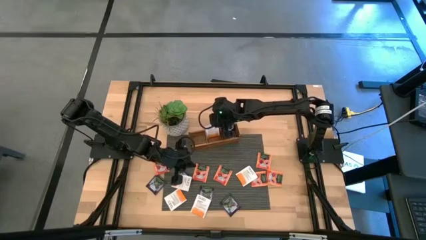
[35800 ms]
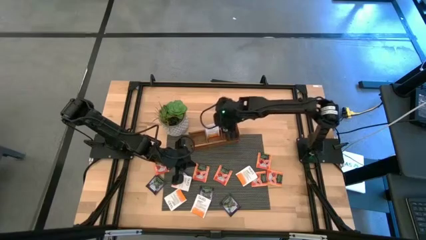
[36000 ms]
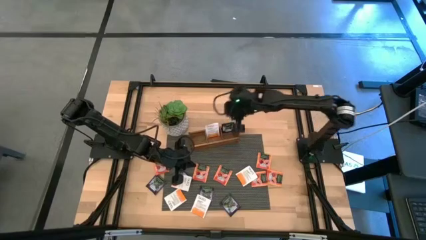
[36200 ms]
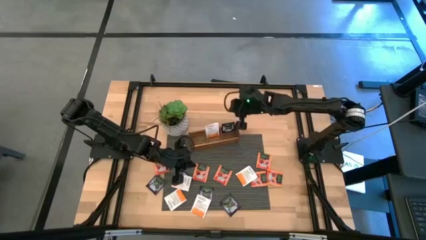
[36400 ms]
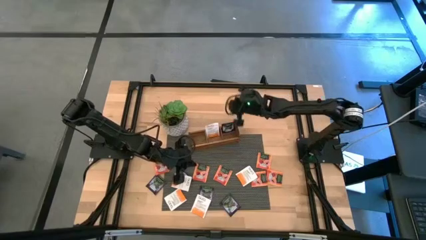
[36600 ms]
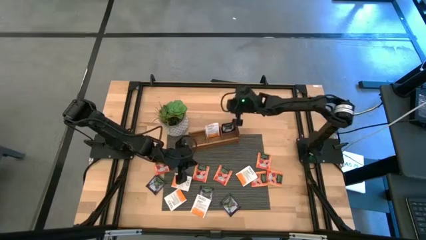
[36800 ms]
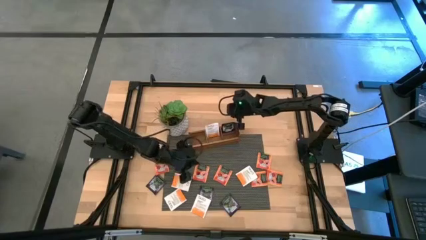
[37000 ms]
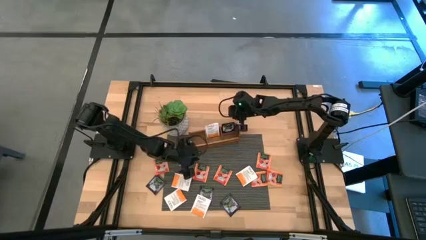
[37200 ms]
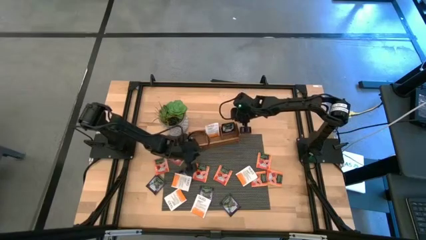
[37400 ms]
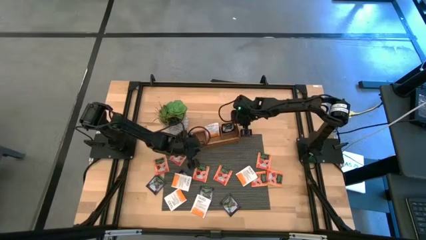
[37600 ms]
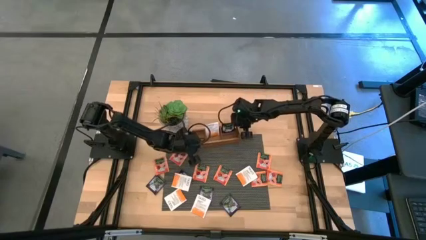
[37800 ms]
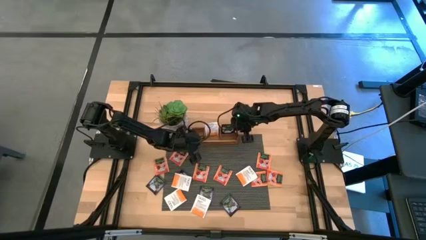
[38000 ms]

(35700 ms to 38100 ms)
Task: Pick & Place Tea
Adjust the wooden organizer on the table

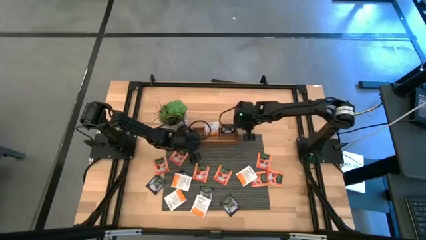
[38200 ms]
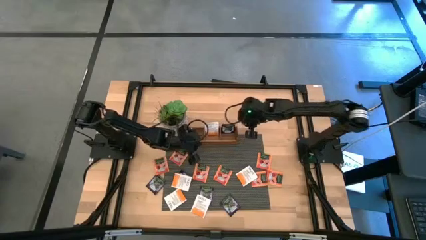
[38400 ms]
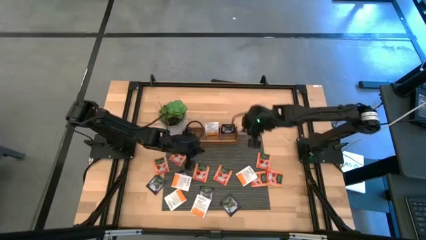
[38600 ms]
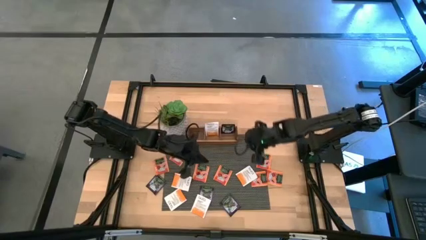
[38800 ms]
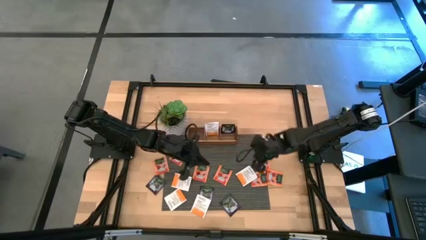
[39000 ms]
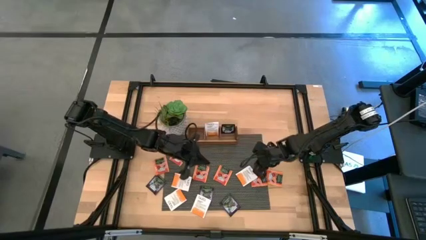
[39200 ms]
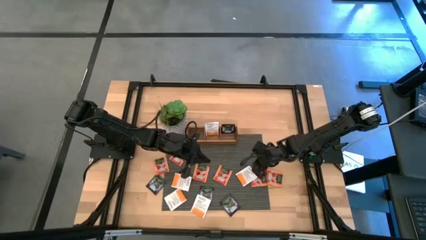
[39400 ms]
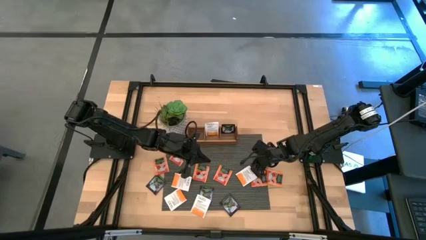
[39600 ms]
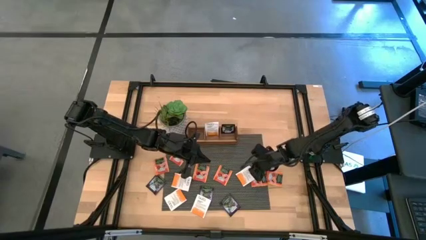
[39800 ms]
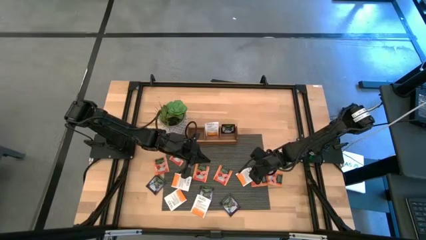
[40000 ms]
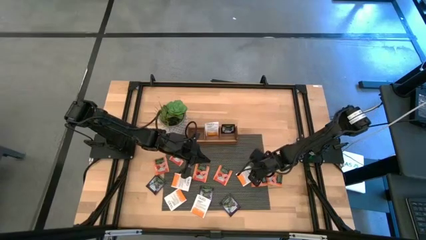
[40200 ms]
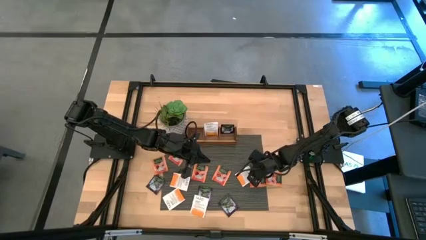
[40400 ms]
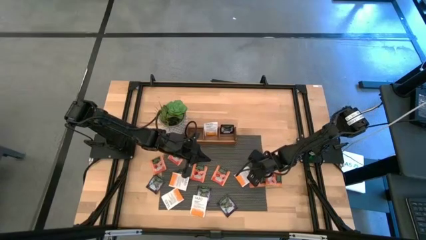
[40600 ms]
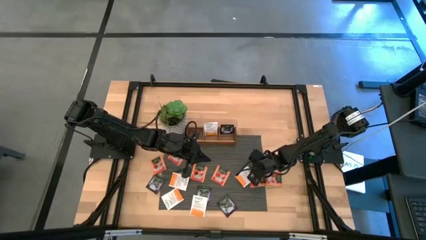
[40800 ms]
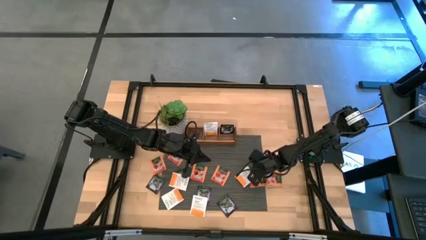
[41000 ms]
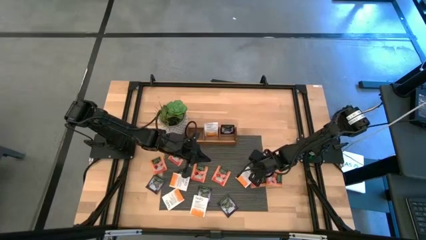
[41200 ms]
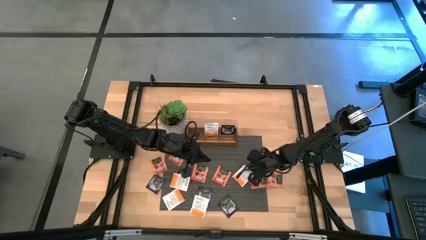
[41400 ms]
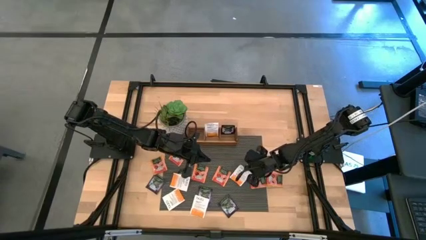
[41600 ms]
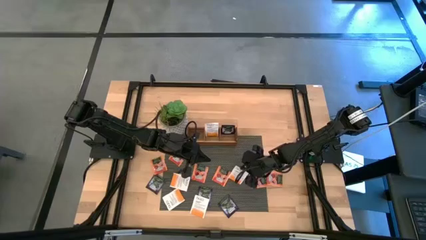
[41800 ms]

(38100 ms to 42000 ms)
Put the white tea bag into the middle slot of the wooden organizer

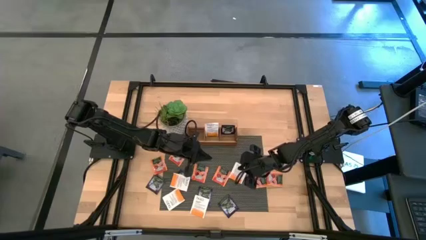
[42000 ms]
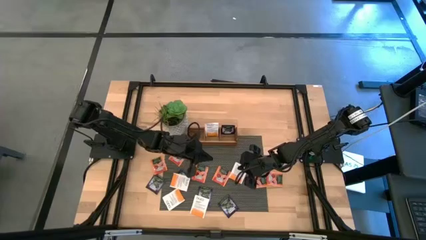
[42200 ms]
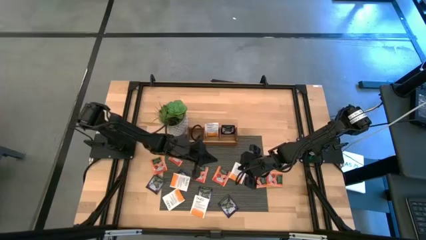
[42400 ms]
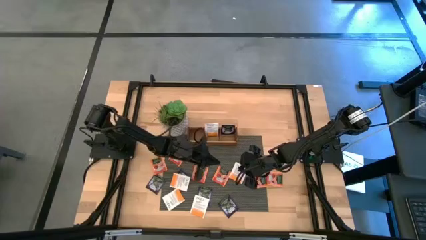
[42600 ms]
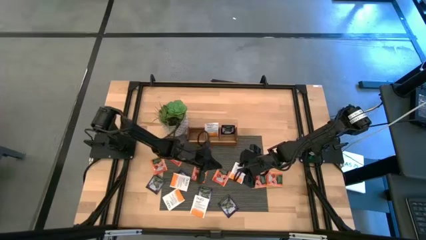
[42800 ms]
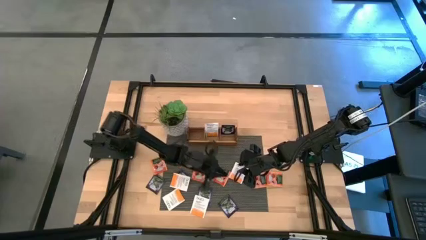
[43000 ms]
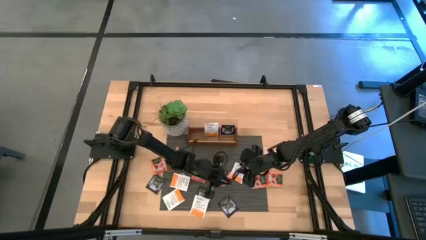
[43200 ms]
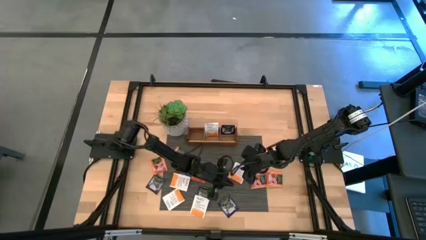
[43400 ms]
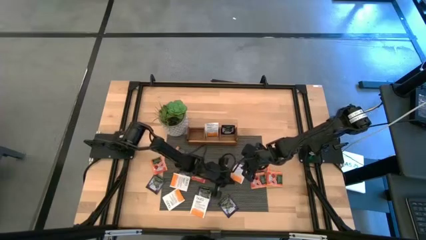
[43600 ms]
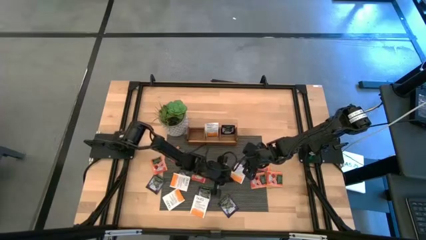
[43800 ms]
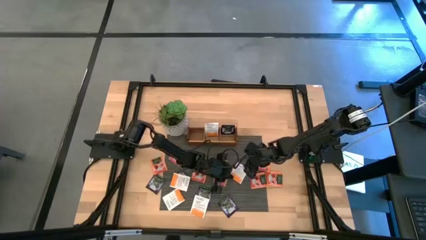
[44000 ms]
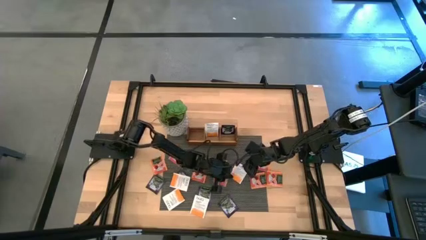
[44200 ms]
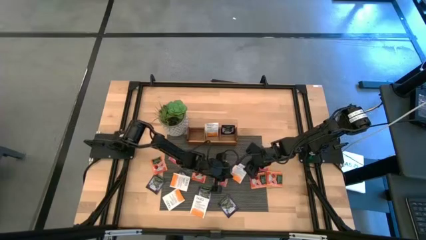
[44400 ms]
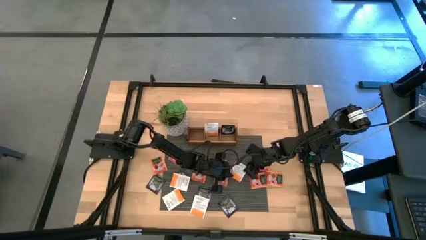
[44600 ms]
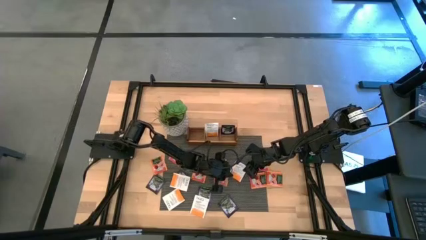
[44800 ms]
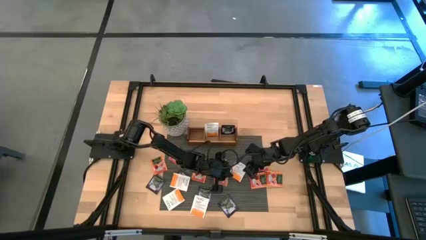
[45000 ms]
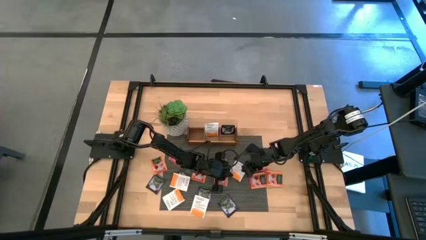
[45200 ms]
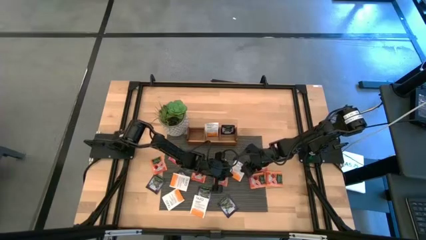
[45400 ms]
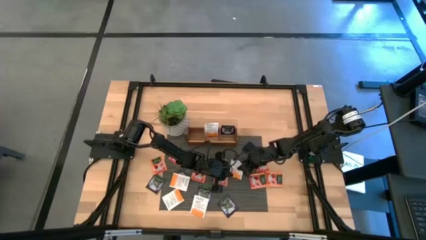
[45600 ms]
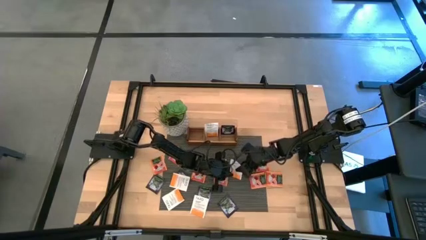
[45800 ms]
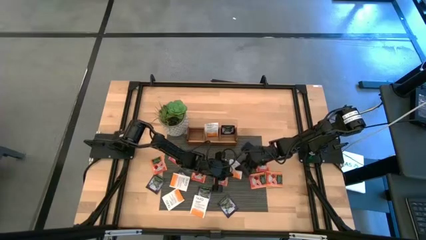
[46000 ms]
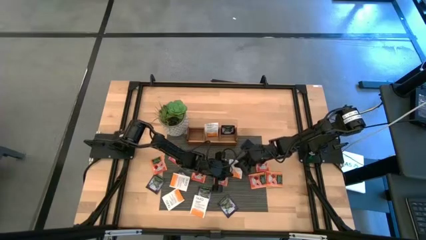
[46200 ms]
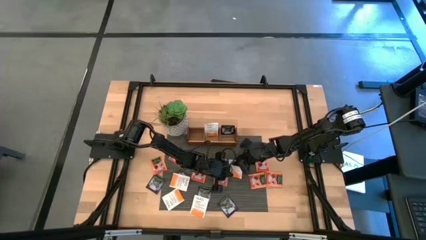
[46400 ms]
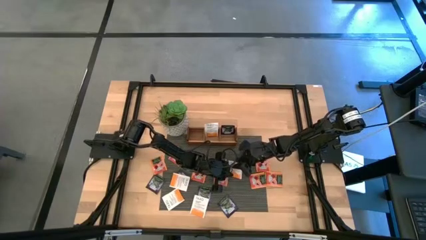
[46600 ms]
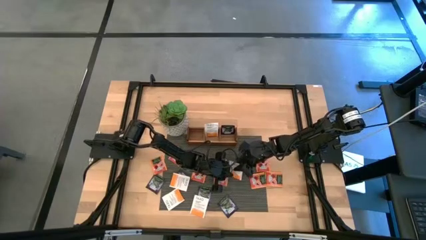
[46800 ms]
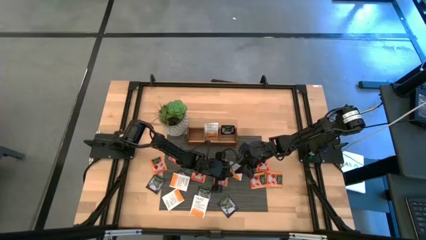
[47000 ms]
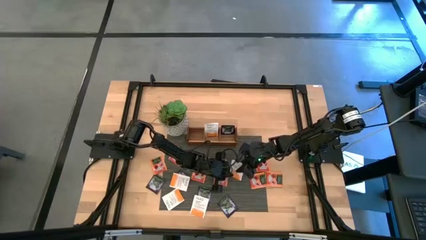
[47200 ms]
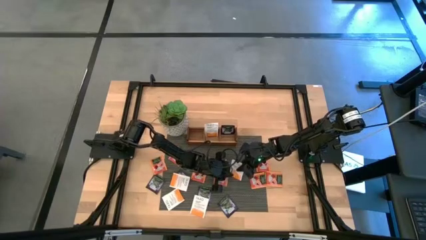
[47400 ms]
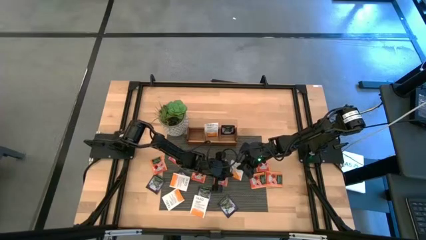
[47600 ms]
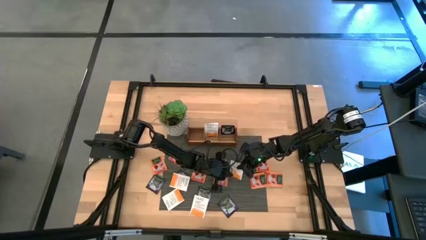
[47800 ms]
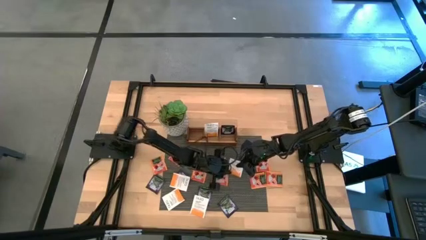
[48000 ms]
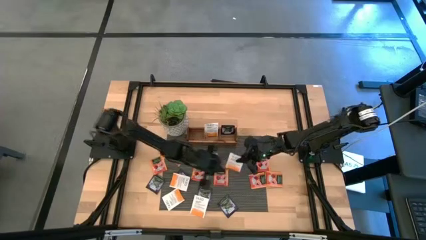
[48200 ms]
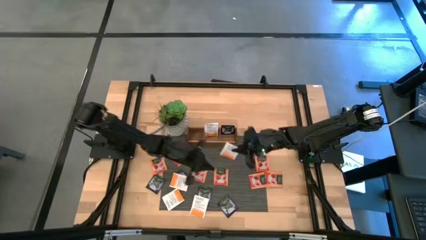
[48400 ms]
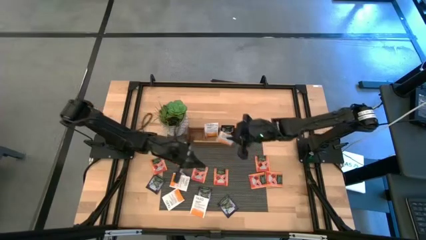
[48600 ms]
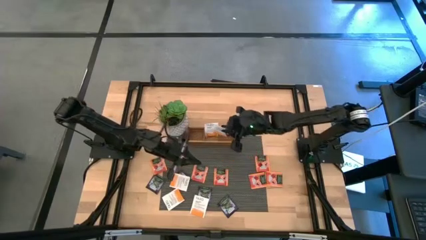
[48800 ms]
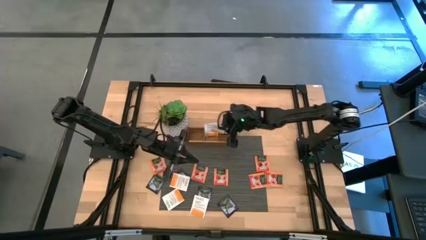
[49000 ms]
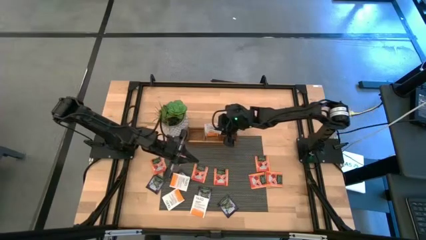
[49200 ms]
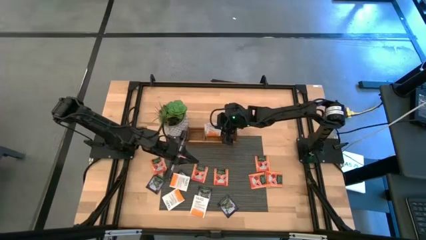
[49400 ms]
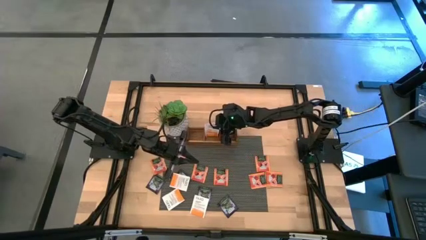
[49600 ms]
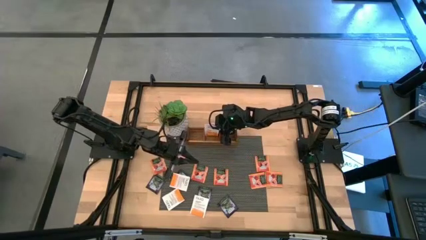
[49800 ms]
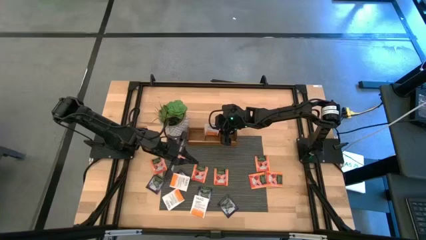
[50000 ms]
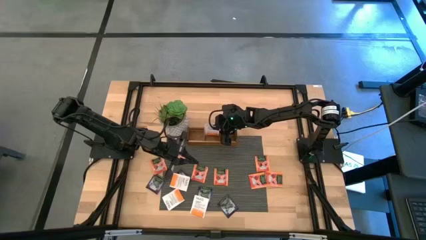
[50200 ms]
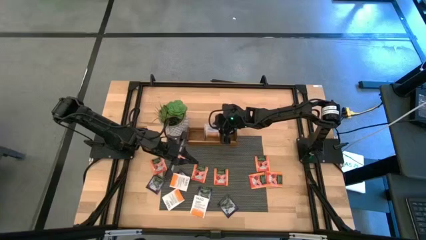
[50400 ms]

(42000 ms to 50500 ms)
Put the white tea bag into the middle slot of the wooden organizer
